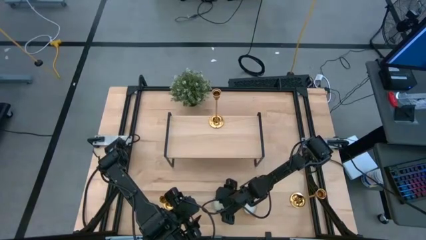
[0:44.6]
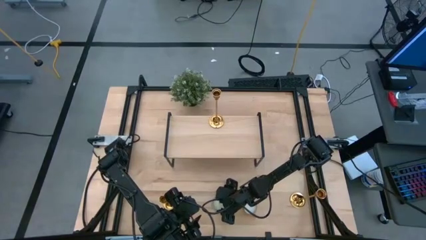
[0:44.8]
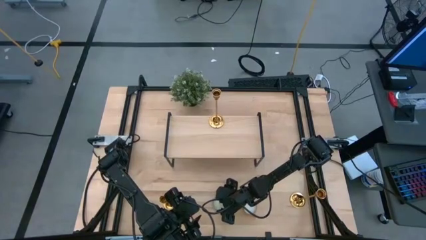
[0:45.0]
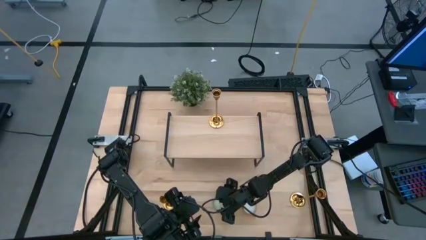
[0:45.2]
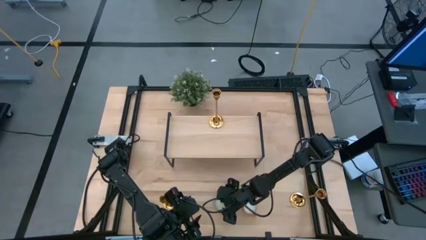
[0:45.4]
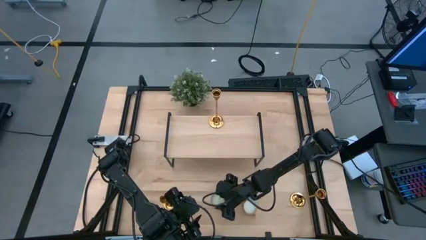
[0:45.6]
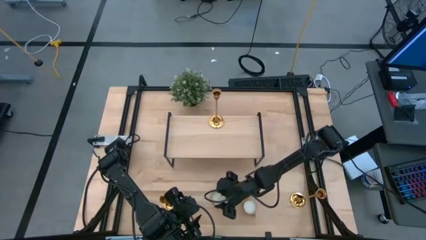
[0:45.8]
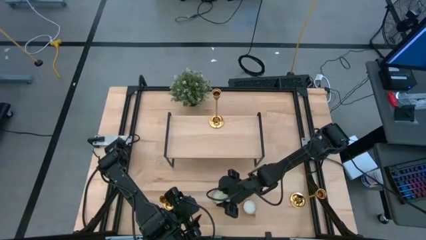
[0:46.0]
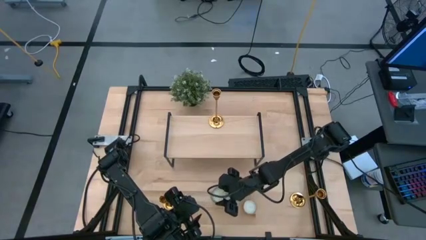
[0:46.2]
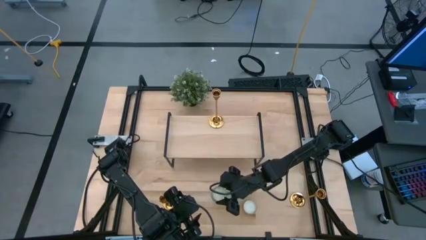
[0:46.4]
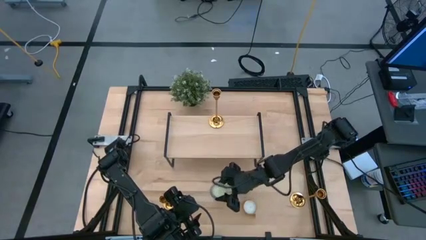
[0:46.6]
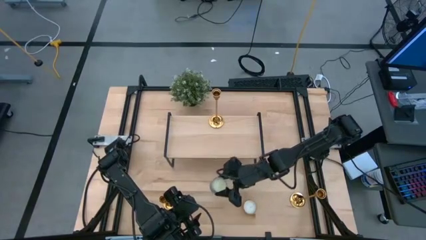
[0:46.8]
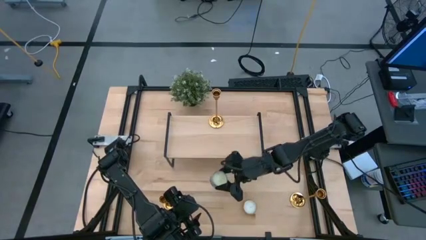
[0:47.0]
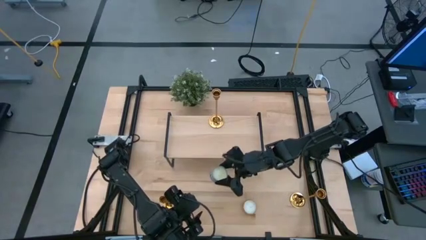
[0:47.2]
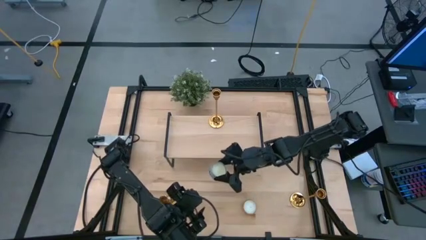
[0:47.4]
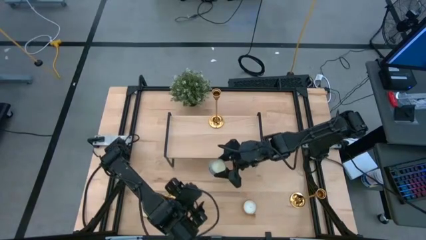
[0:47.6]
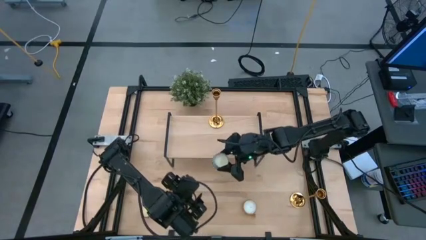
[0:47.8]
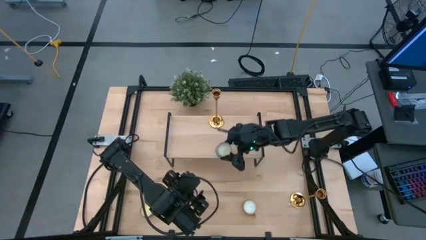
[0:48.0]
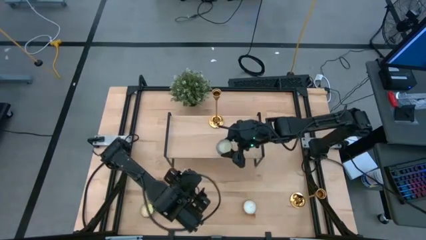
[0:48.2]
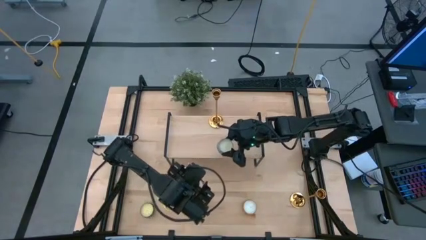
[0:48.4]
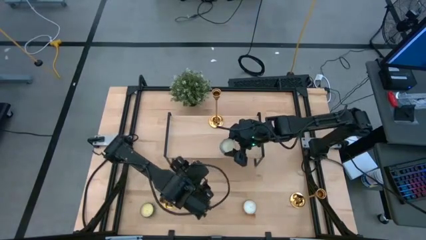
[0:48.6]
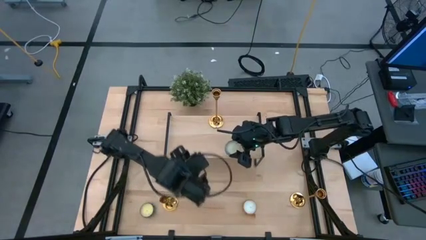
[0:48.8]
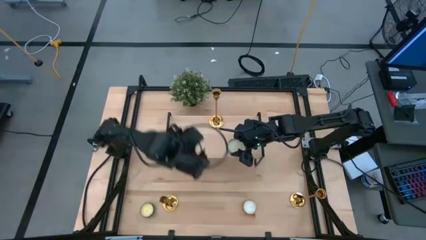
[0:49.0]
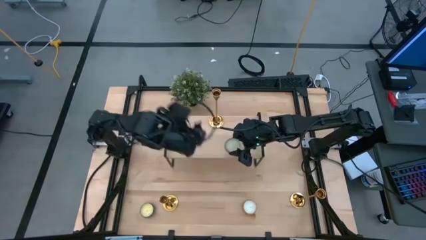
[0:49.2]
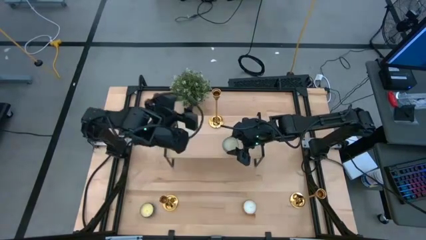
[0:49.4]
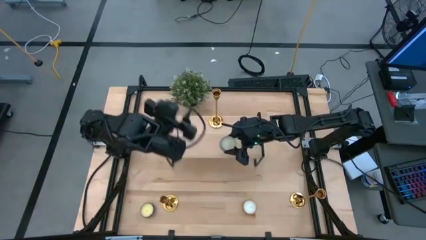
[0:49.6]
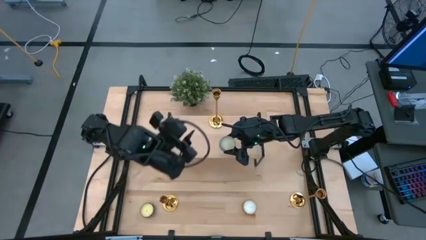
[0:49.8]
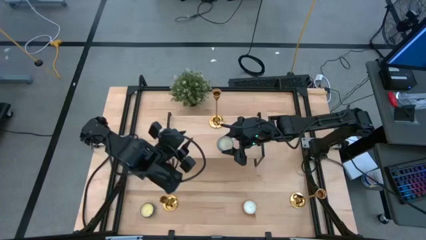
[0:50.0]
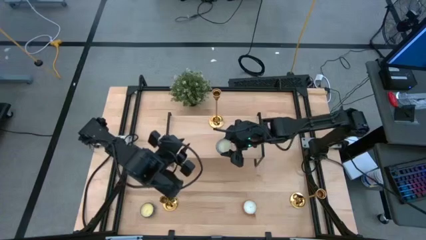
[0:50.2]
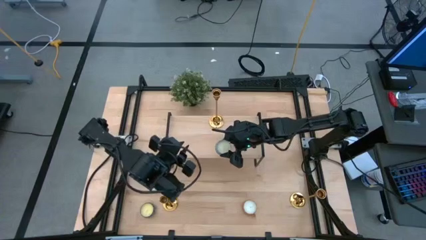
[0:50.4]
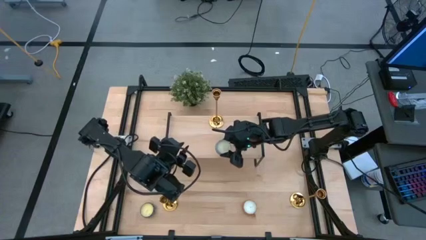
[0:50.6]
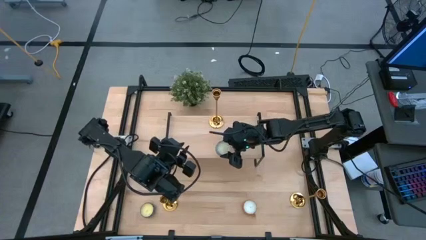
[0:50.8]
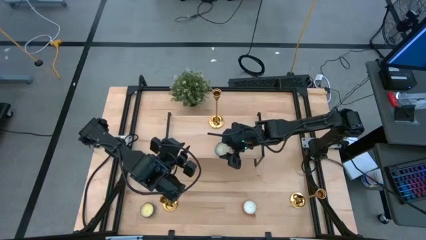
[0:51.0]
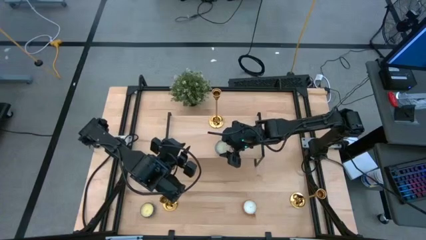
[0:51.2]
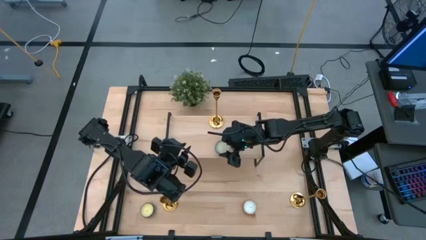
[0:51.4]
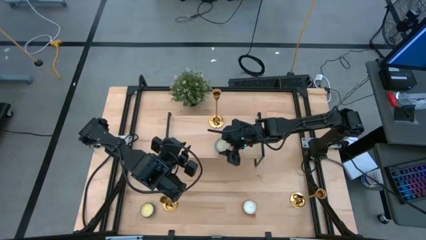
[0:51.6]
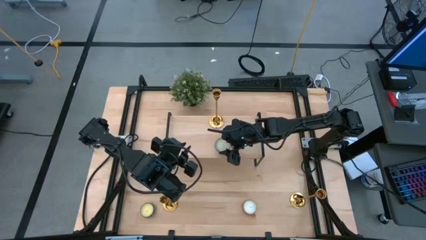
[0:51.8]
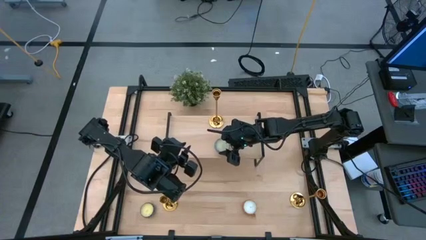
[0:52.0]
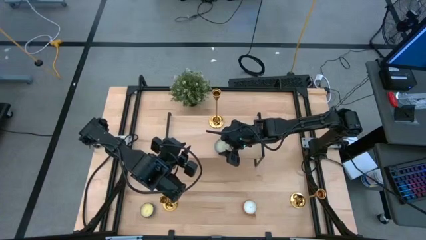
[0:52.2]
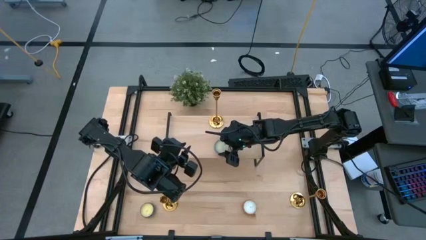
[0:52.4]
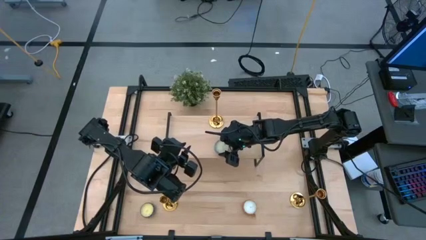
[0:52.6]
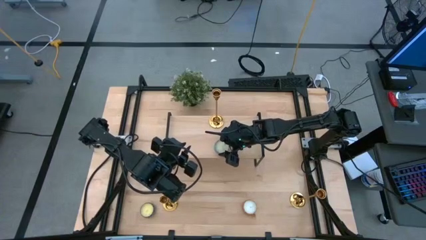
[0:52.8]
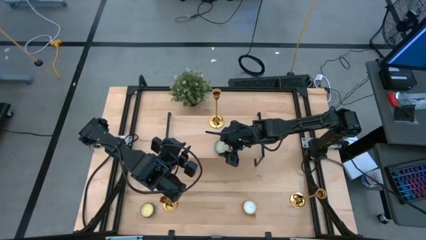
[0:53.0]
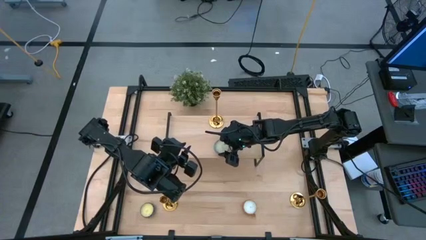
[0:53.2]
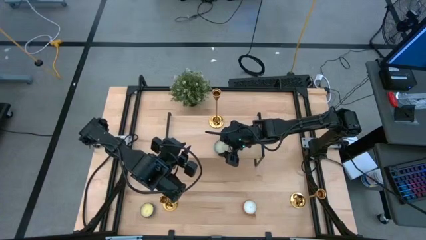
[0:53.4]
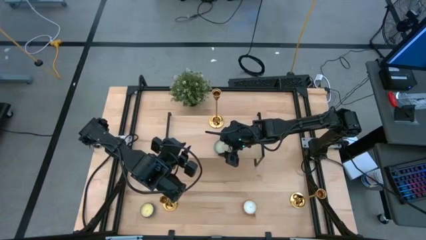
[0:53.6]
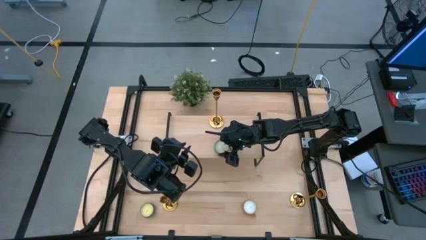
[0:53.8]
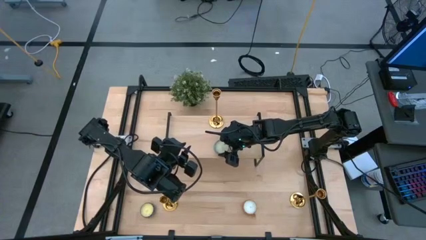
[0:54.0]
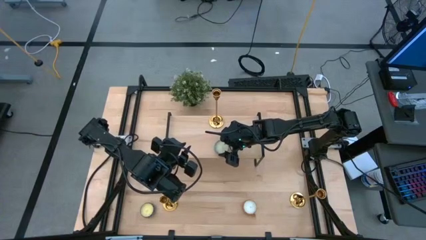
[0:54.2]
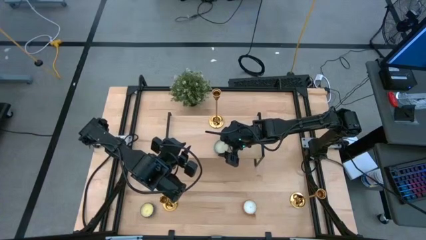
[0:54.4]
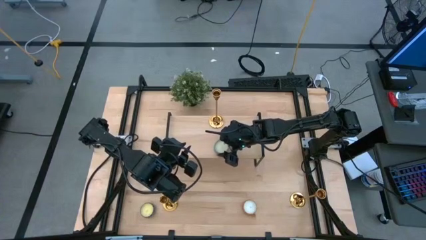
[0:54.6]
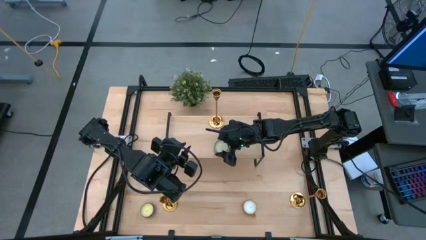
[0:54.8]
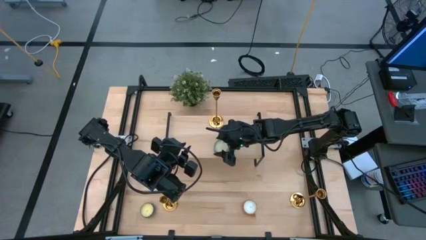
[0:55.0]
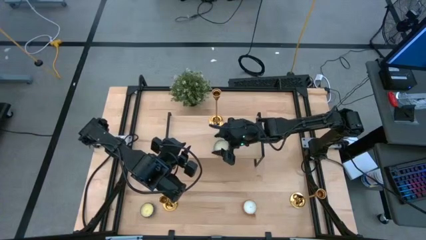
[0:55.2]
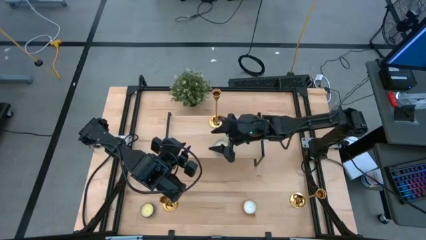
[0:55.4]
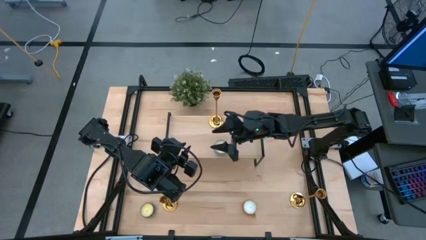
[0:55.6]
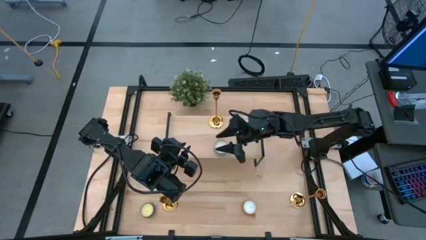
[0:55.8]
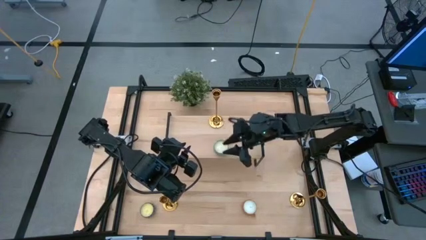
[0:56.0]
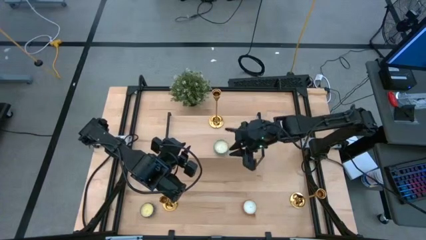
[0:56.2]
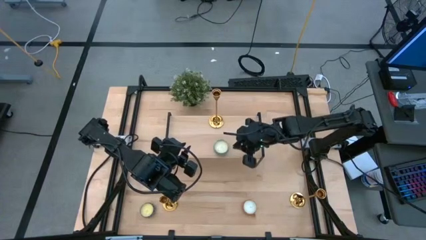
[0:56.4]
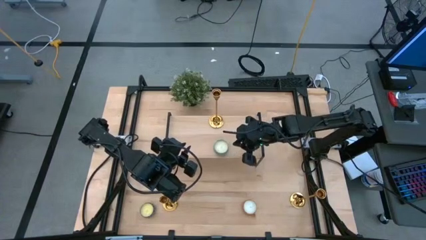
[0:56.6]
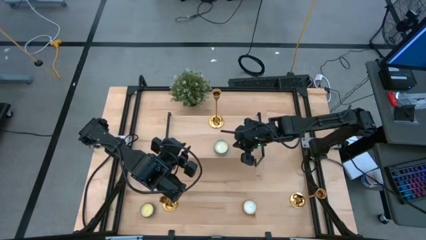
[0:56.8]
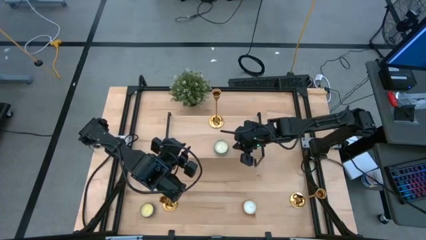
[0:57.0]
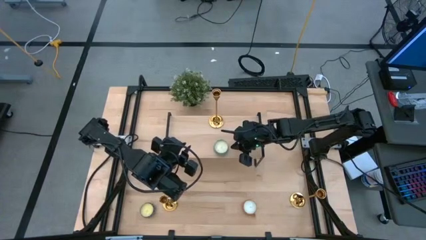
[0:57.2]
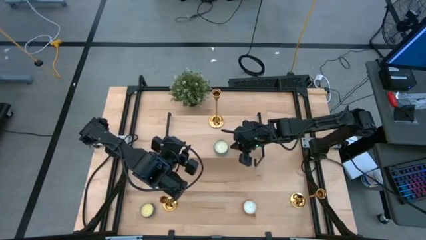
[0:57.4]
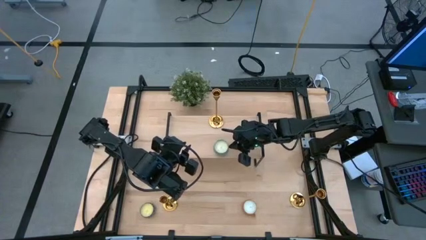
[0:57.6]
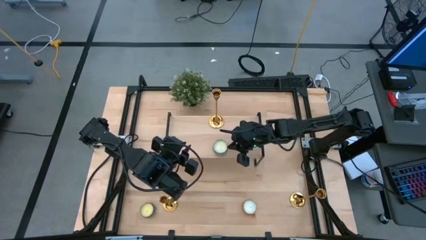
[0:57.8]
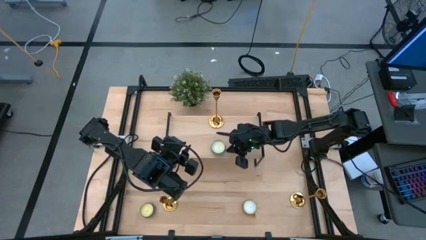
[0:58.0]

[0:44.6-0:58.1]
Task: Stock candles and holders on shelf
Put the blue scented candle on the shelf
